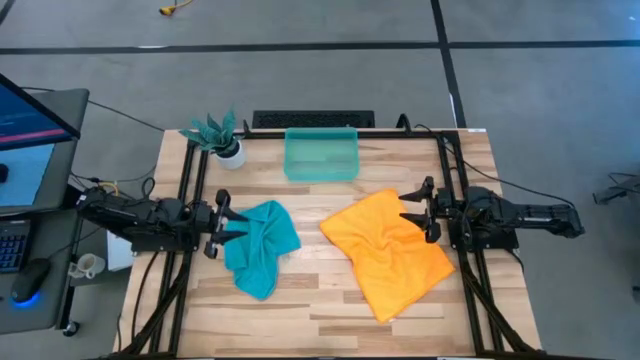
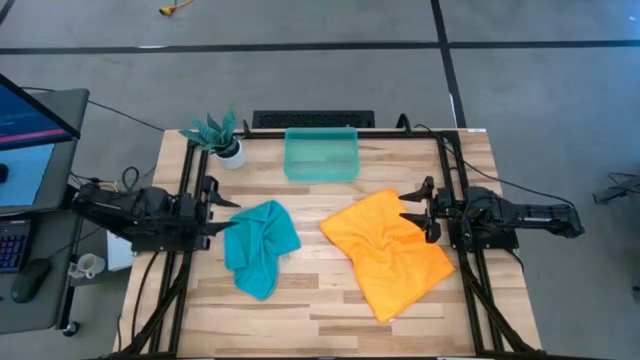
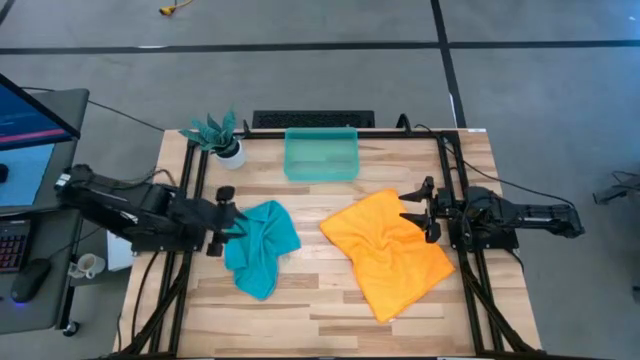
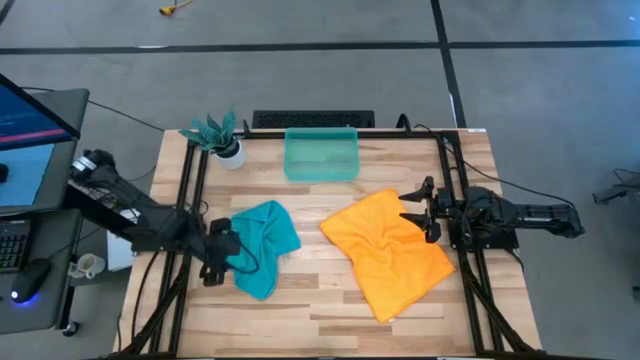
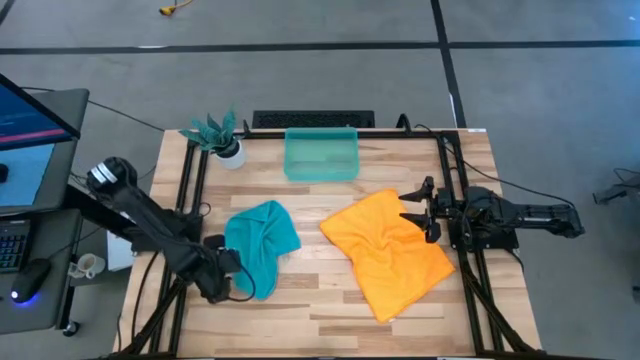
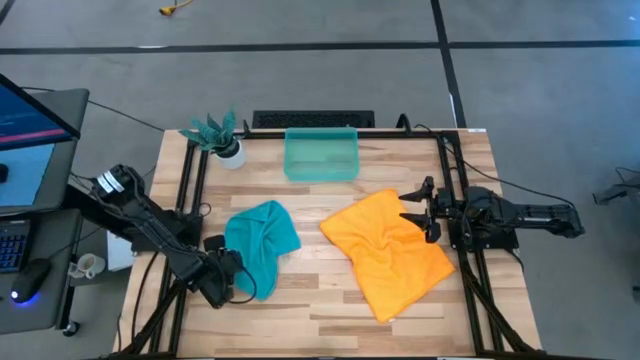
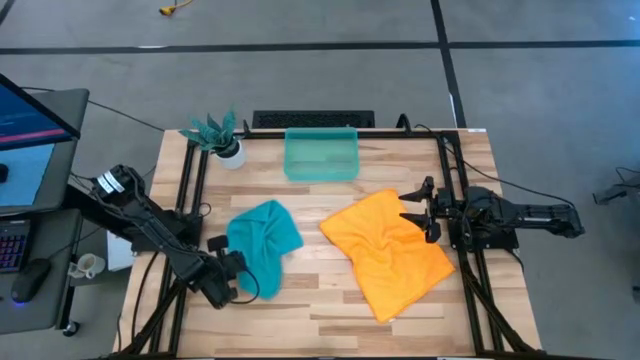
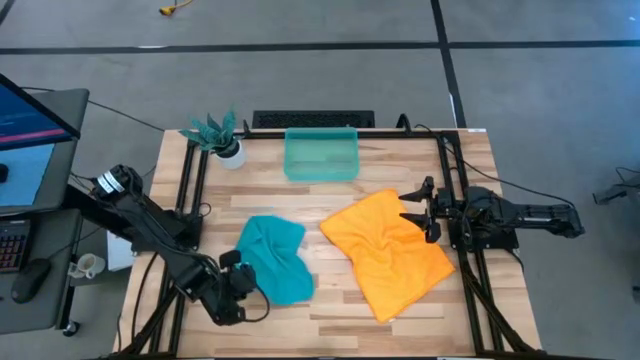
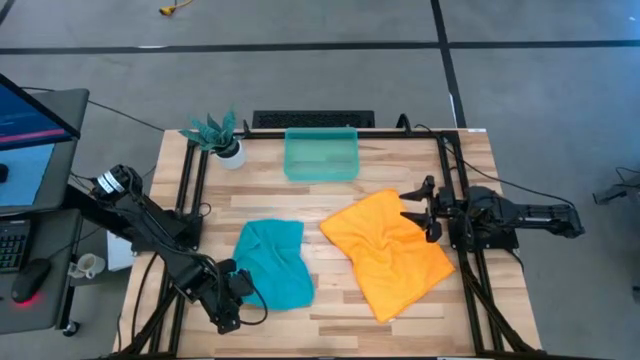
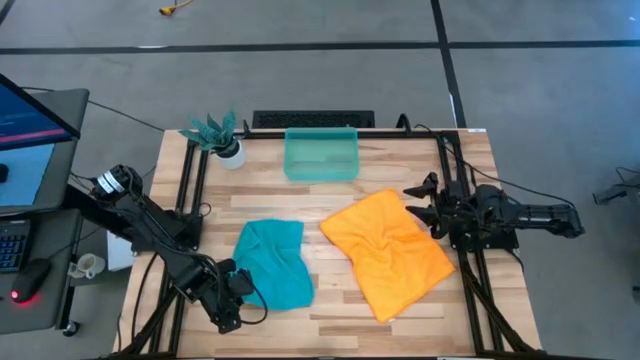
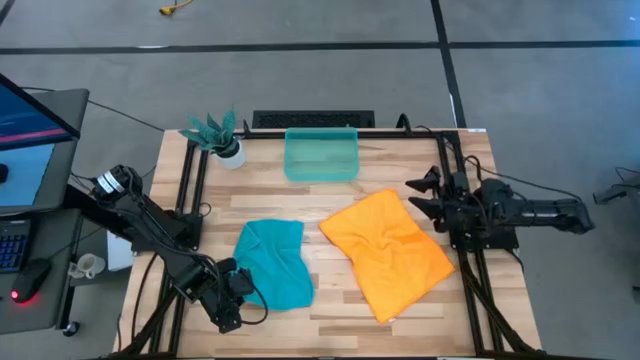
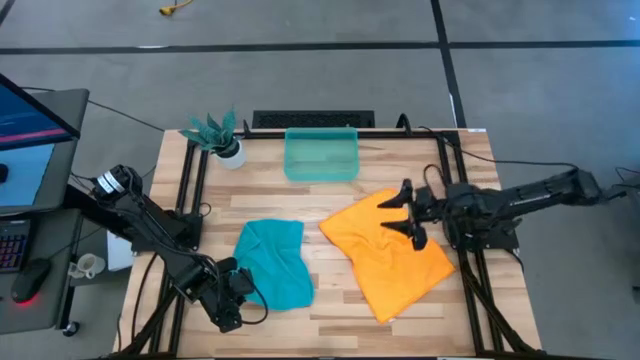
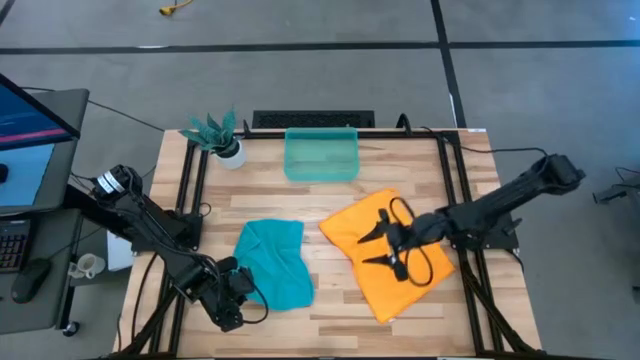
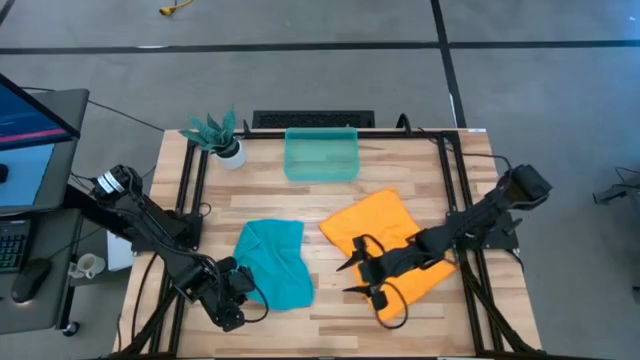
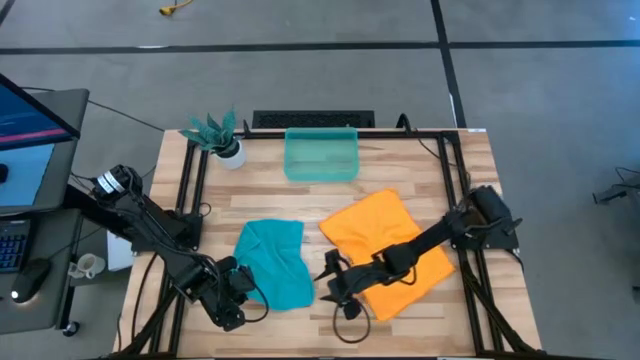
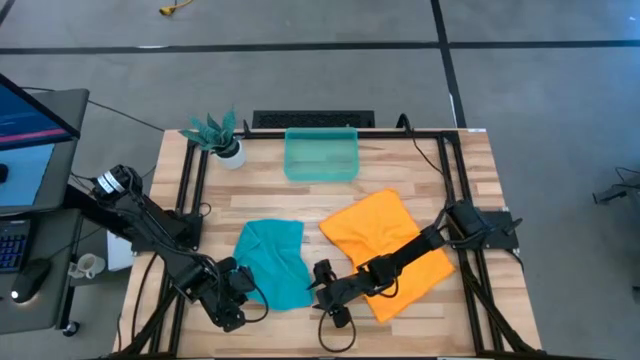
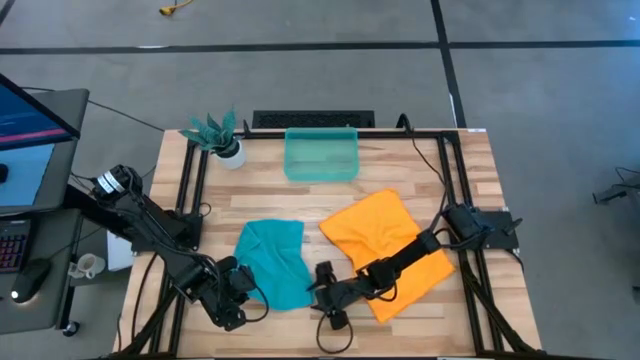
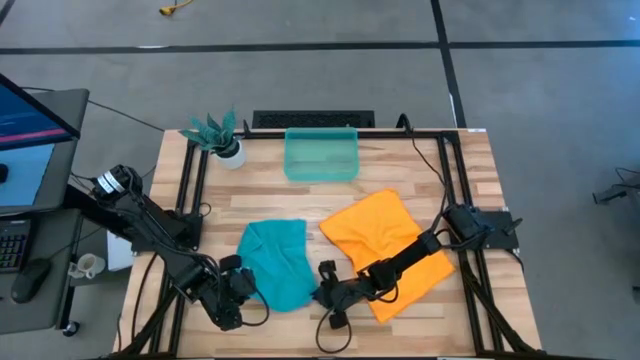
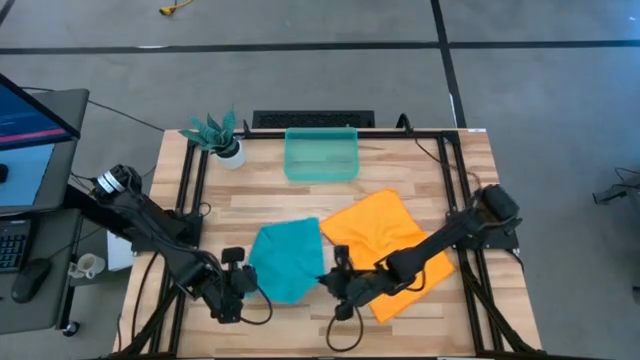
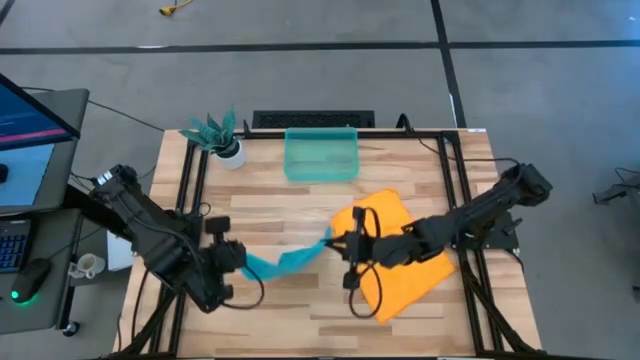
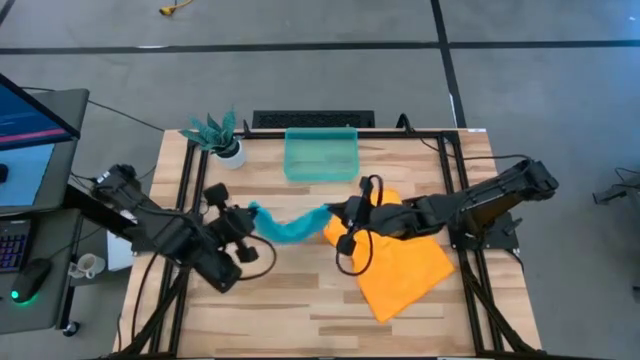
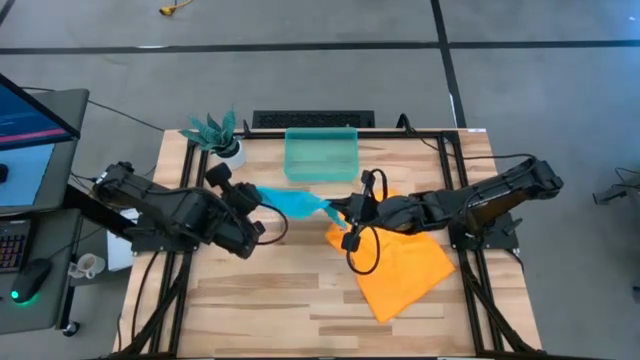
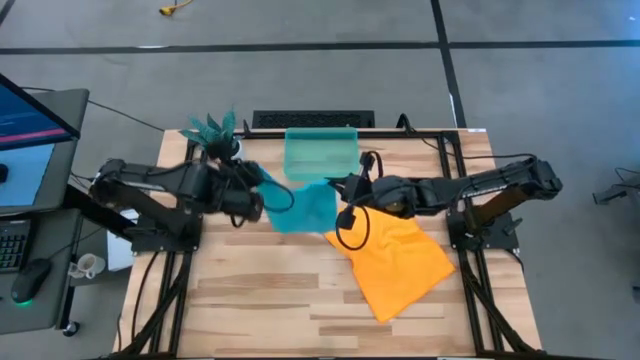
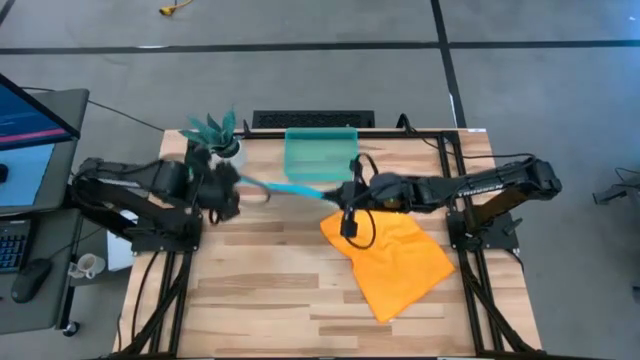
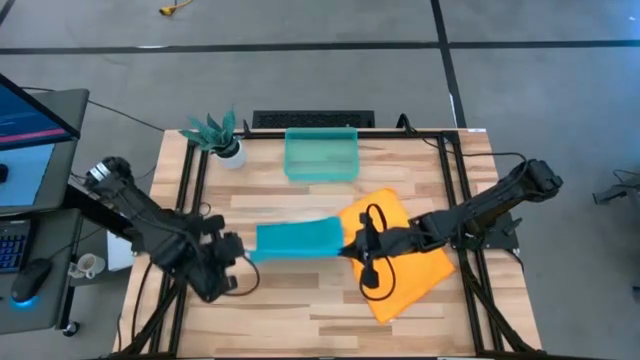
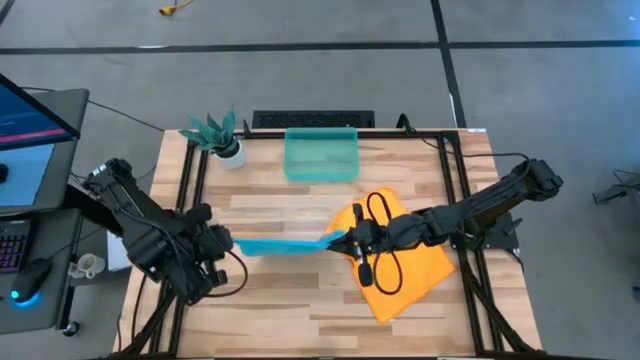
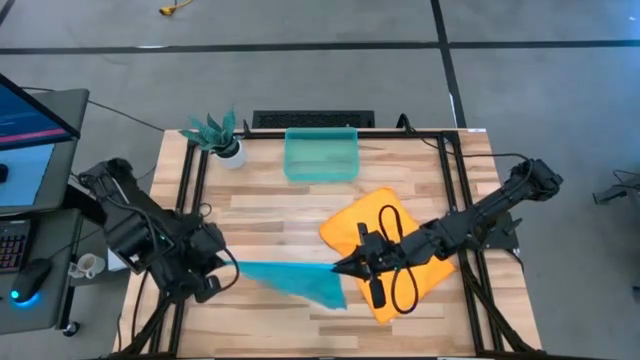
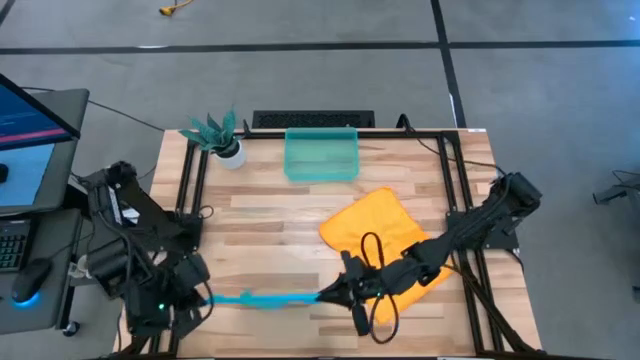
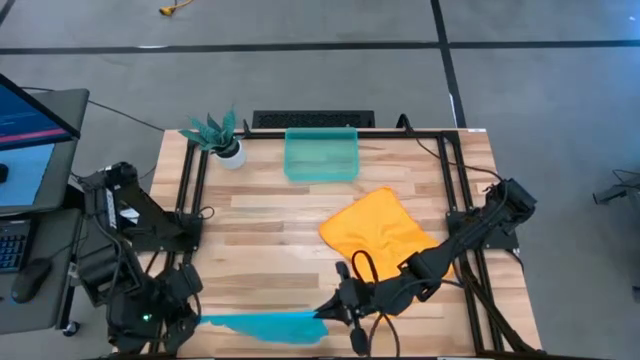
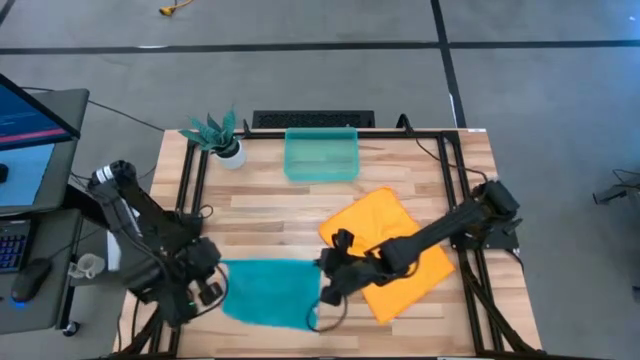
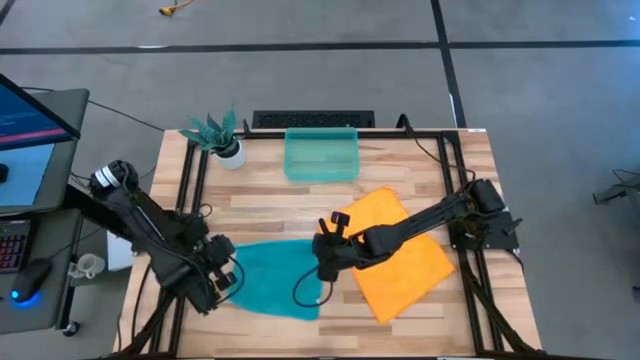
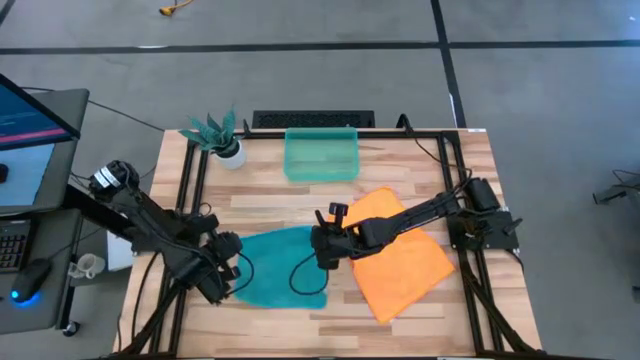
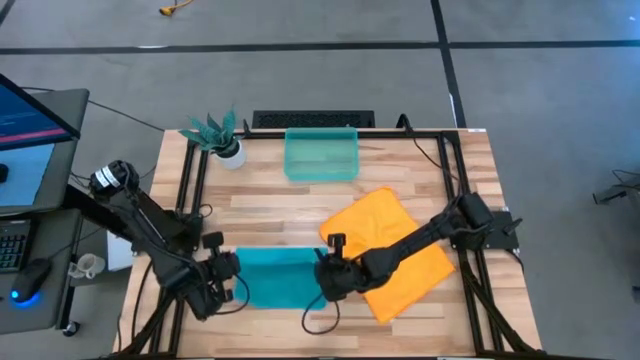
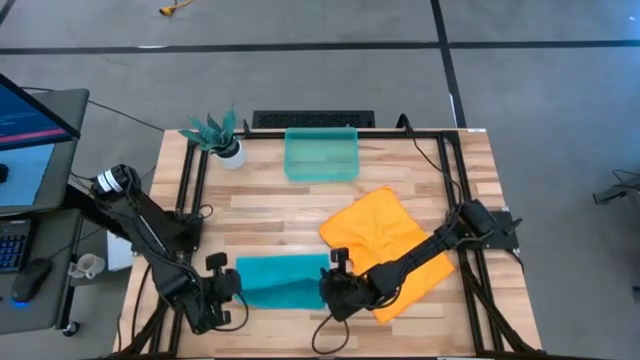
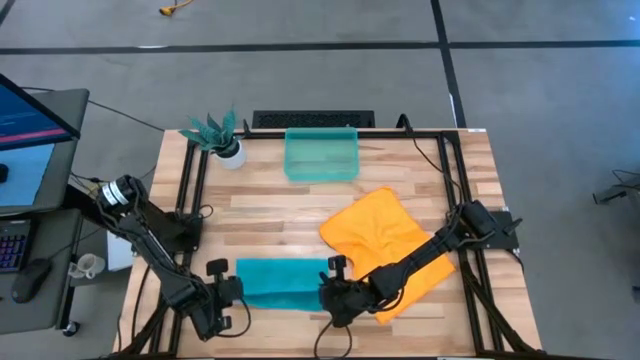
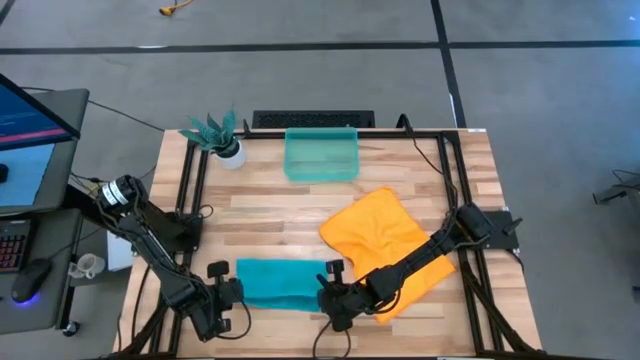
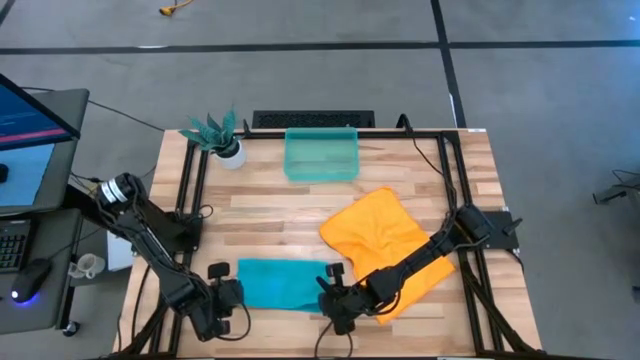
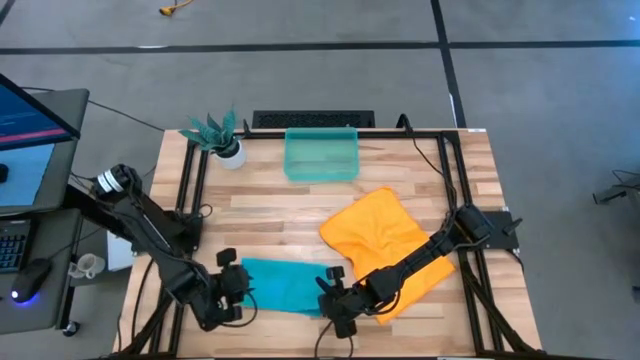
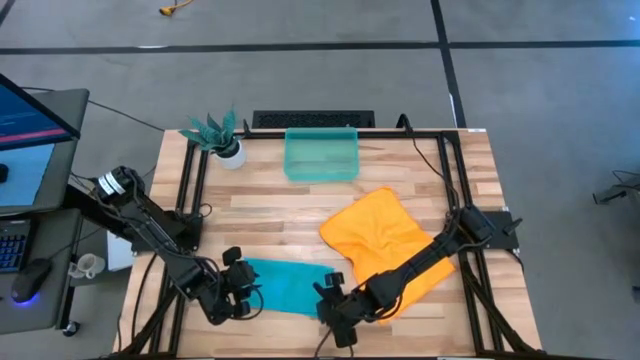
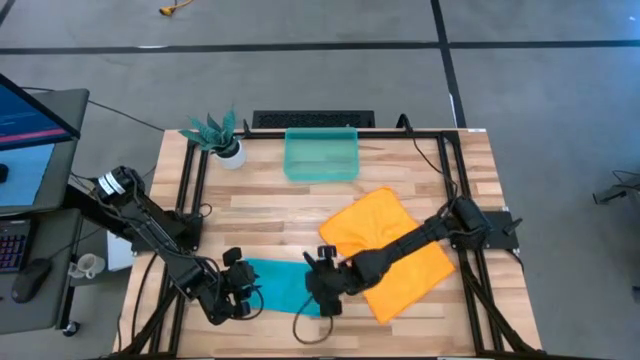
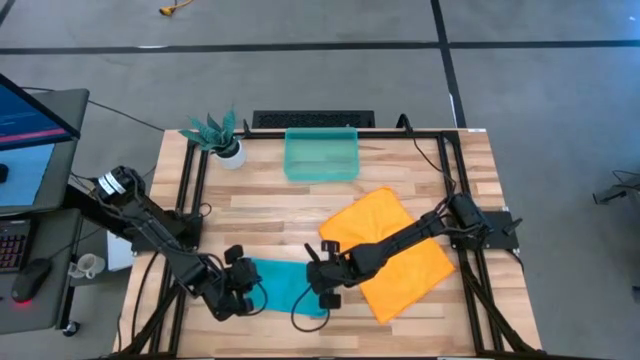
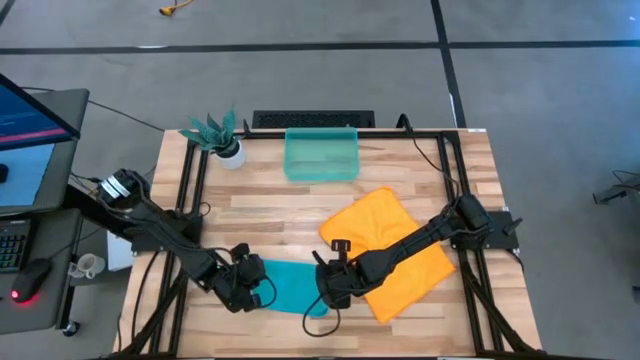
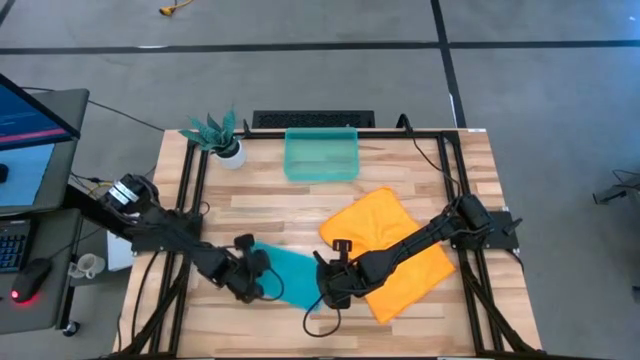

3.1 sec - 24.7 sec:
Task: Roll microfiber towels into tight, uniform cylinder then place into a basket
Fold the blue microfiber cloth
